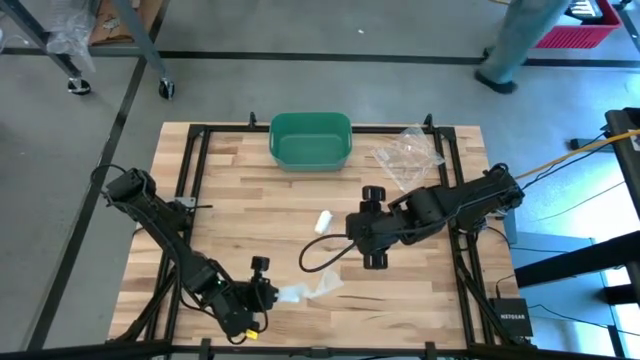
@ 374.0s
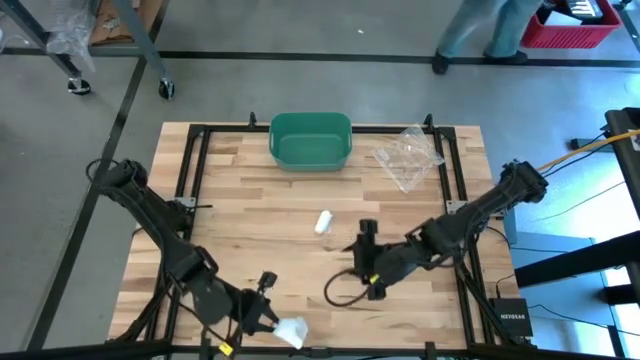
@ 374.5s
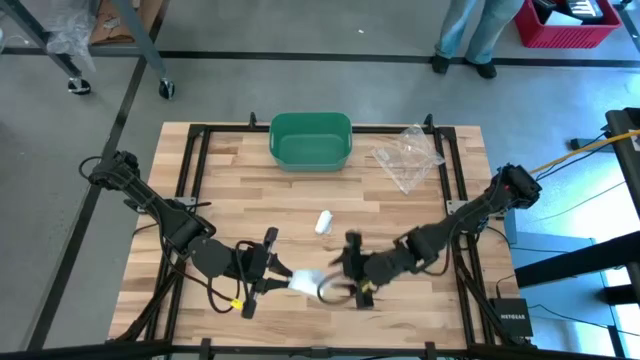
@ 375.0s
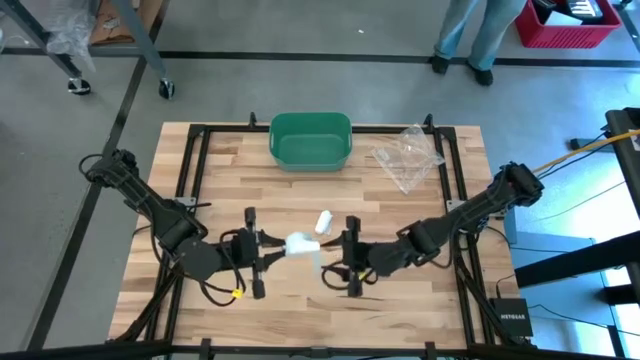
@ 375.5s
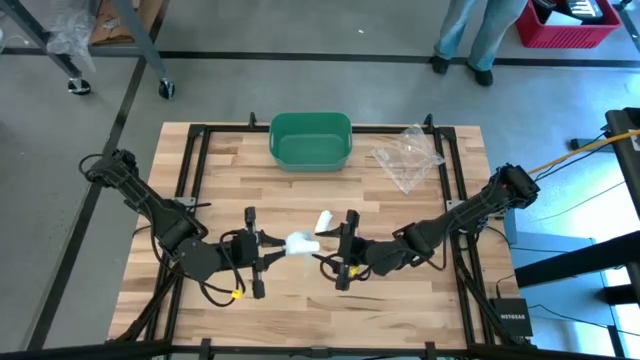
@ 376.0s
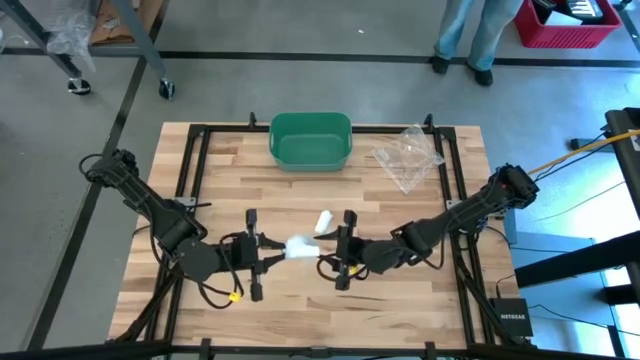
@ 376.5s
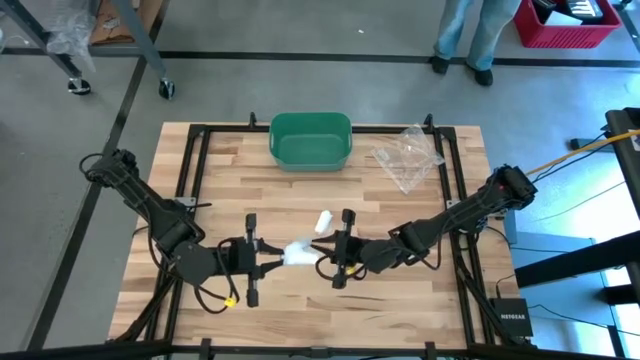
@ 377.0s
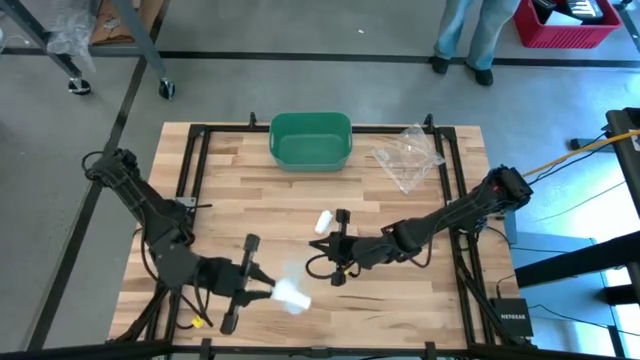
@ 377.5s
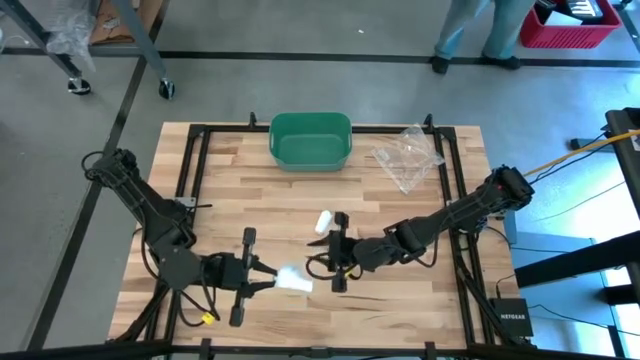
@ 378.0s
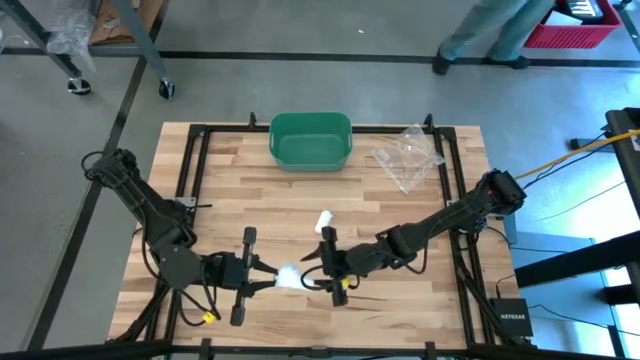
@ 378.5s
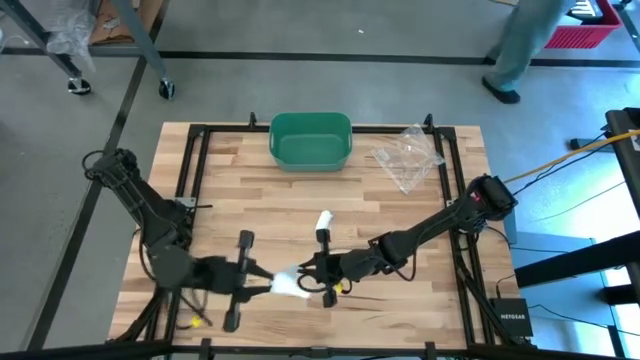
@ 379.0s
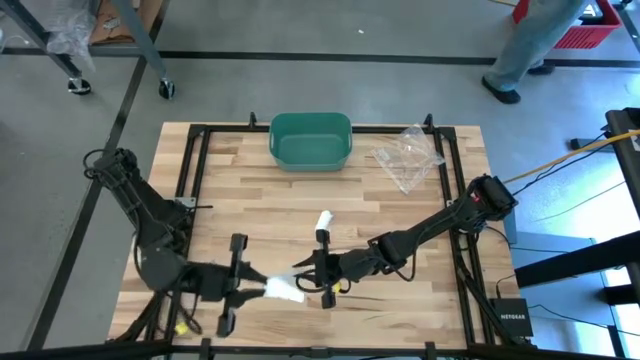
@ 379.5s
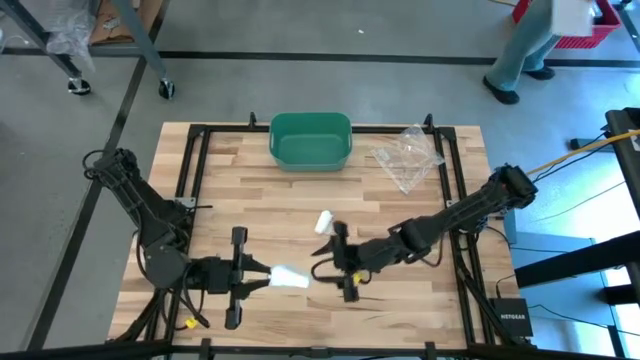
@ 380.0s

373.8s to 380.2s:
Task: Roll bandage
Roll the bottom white bandage

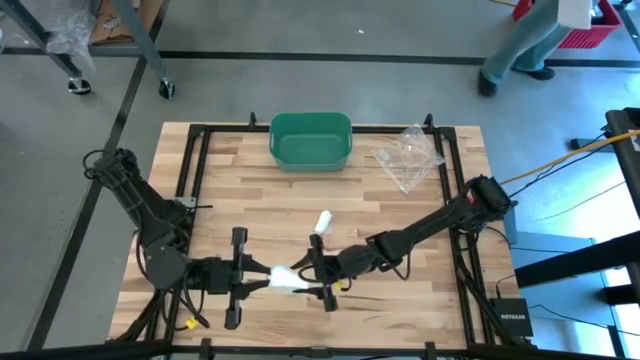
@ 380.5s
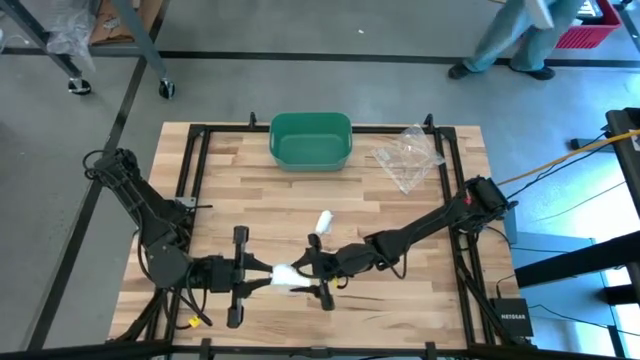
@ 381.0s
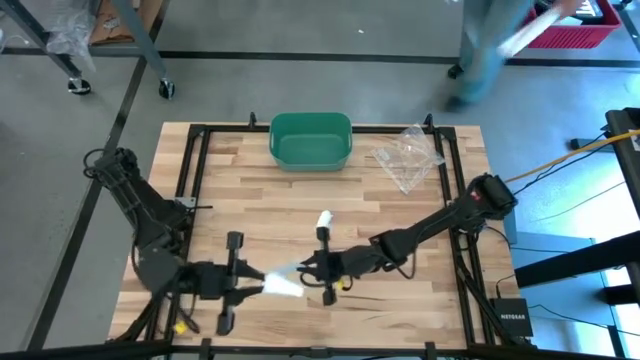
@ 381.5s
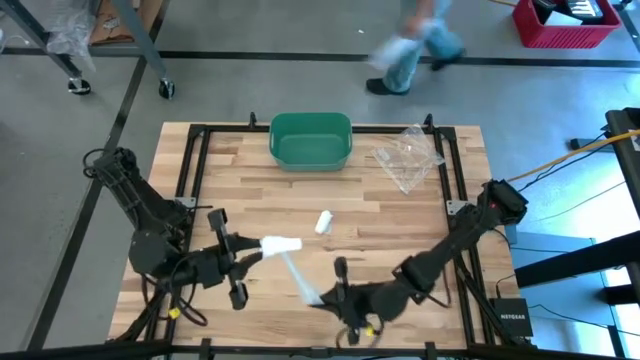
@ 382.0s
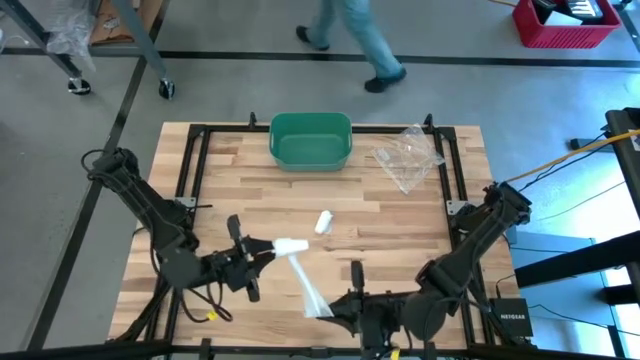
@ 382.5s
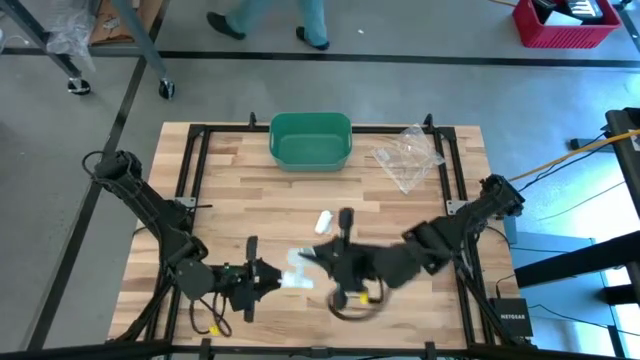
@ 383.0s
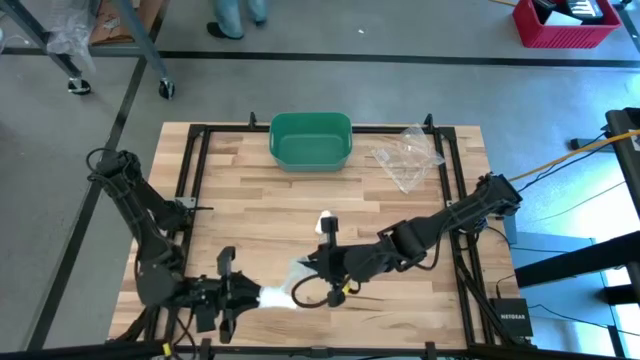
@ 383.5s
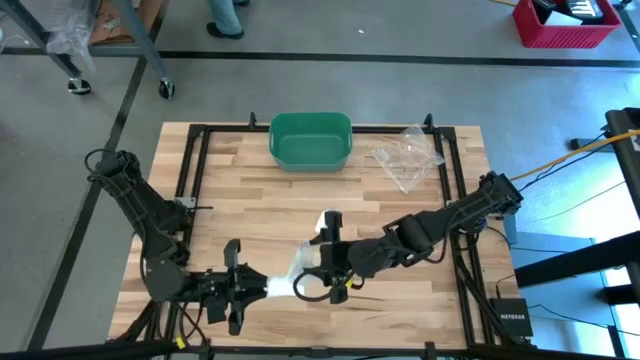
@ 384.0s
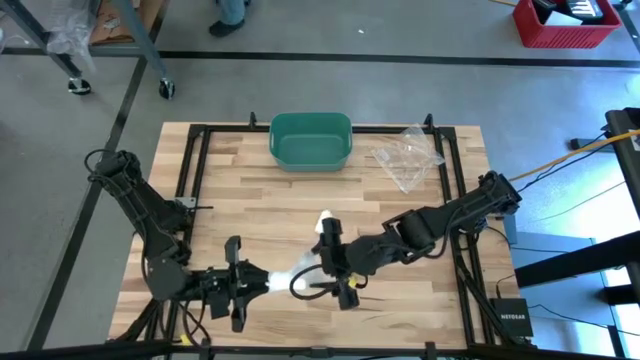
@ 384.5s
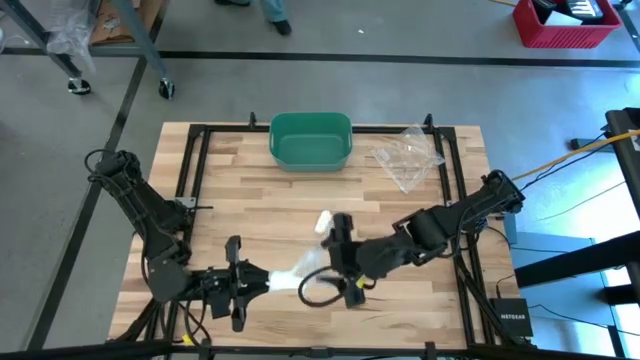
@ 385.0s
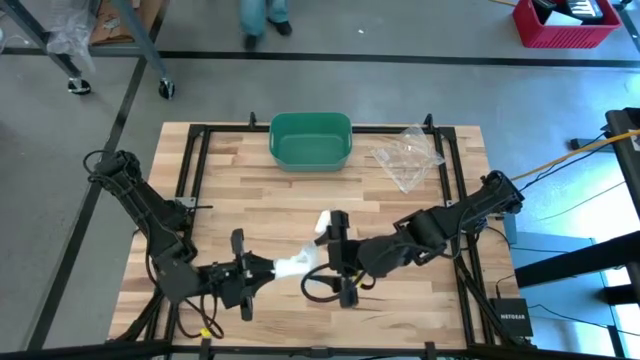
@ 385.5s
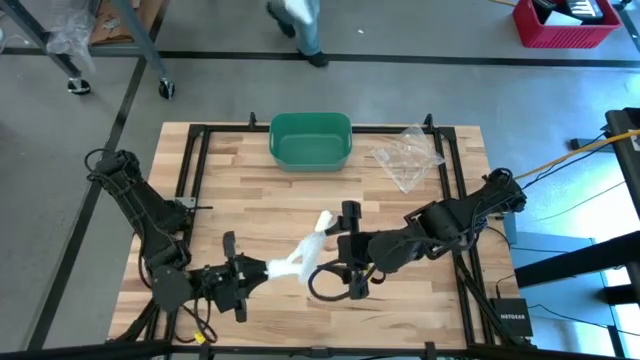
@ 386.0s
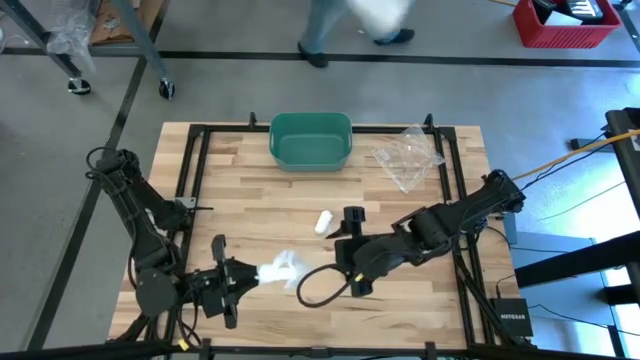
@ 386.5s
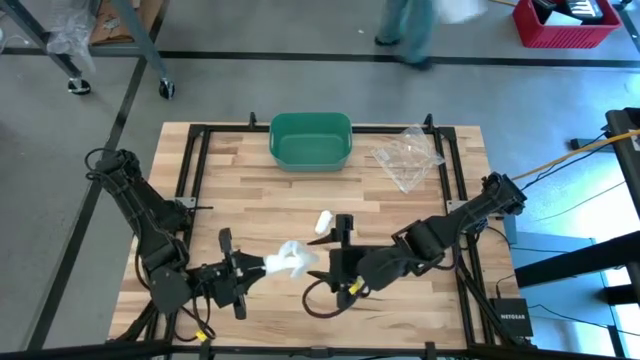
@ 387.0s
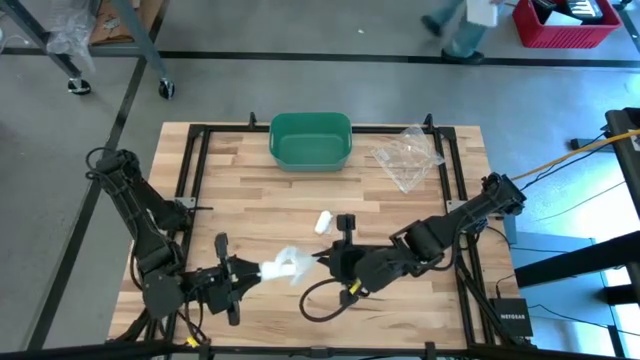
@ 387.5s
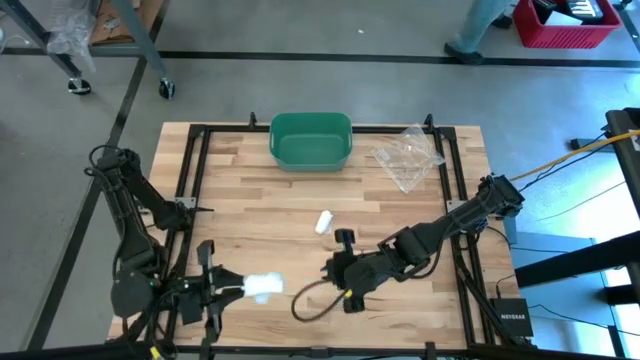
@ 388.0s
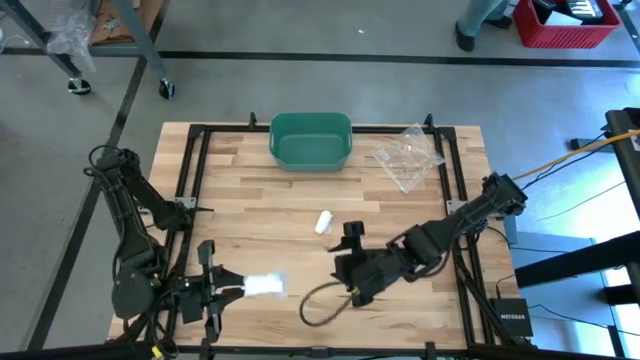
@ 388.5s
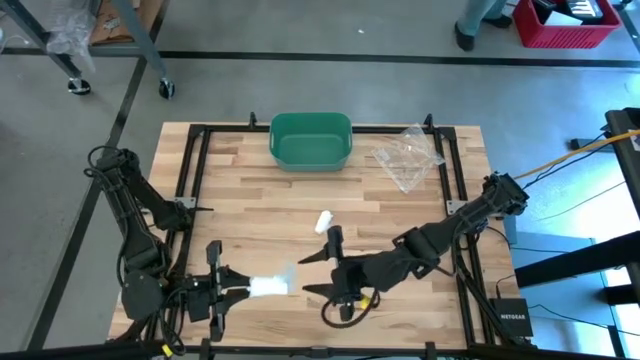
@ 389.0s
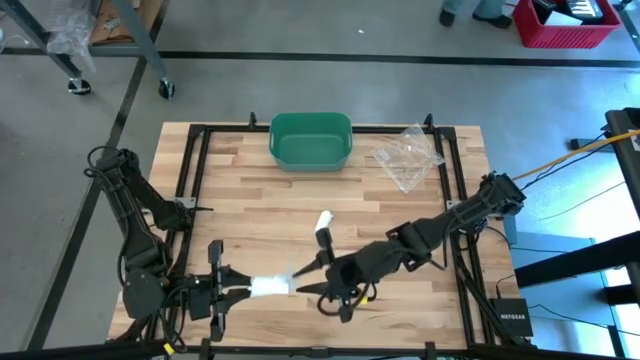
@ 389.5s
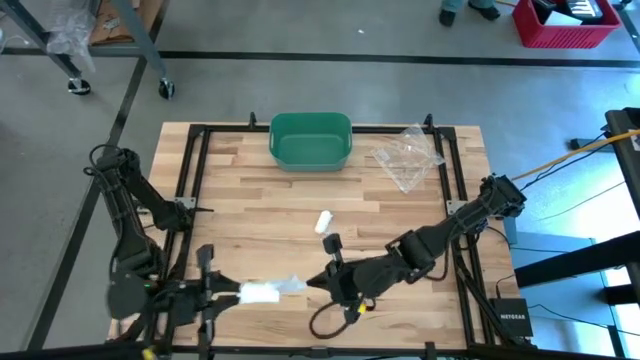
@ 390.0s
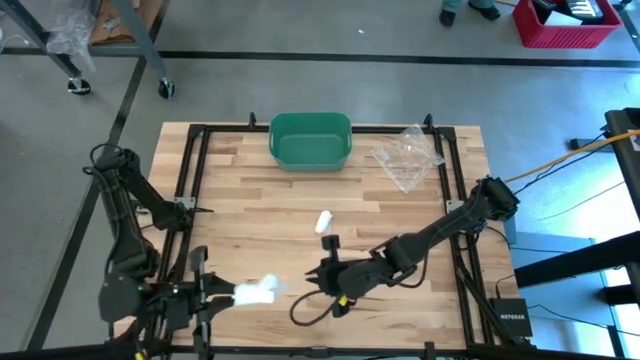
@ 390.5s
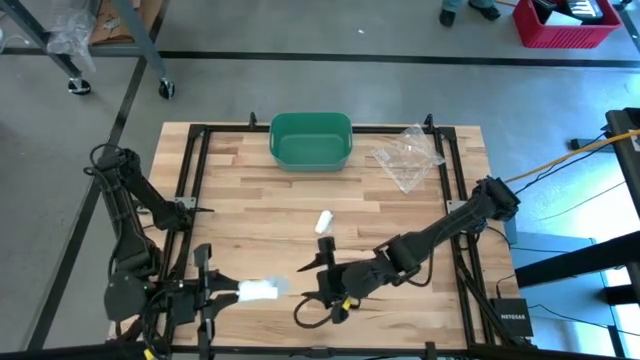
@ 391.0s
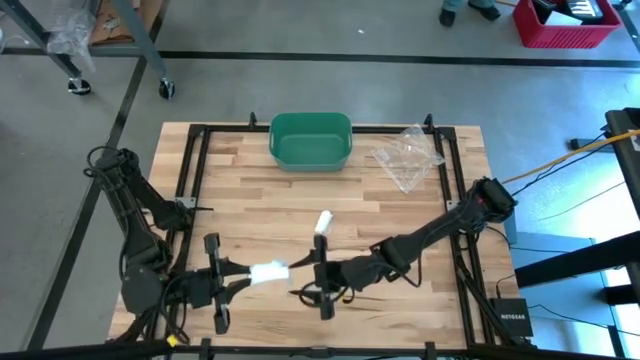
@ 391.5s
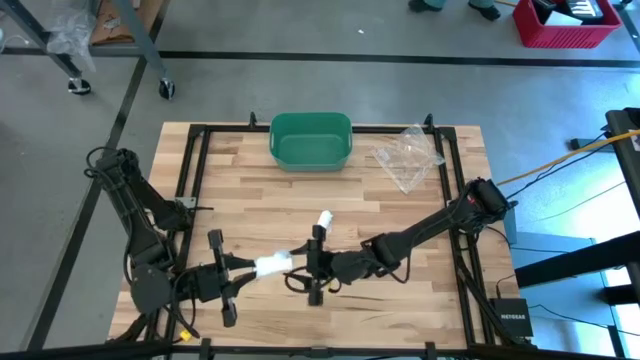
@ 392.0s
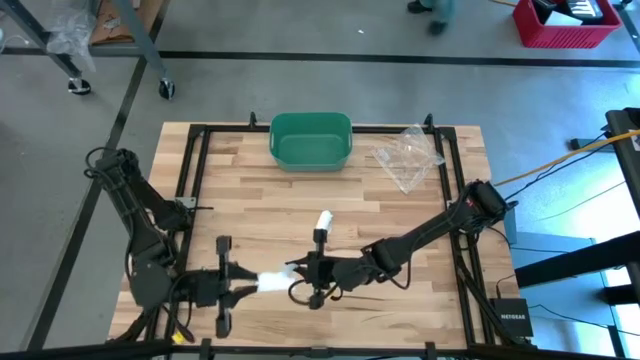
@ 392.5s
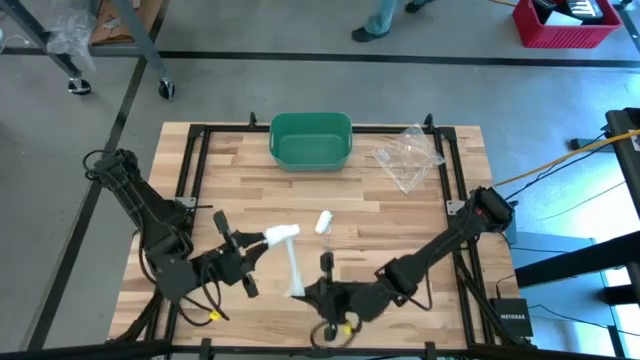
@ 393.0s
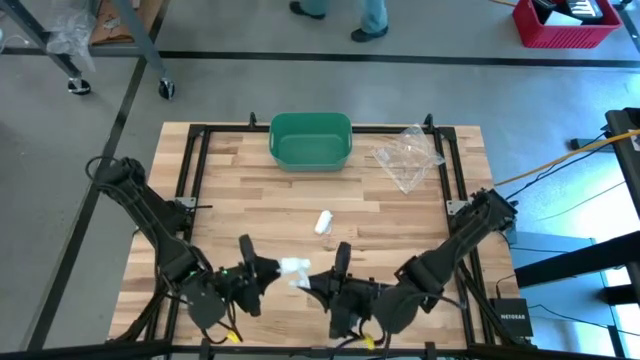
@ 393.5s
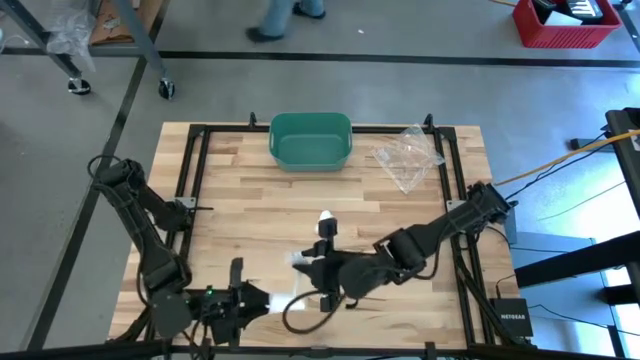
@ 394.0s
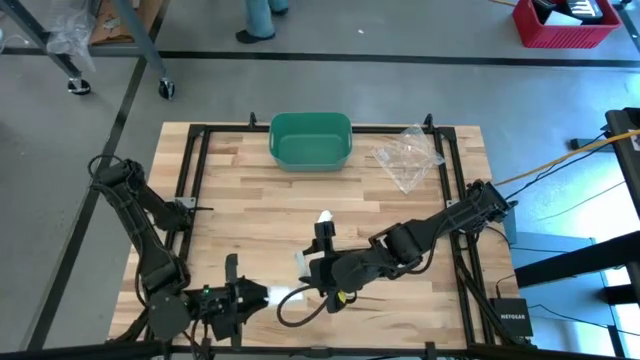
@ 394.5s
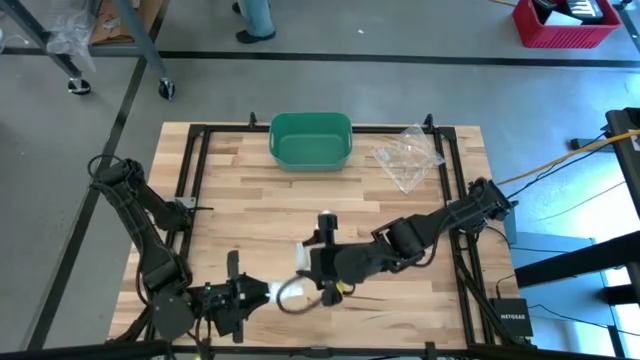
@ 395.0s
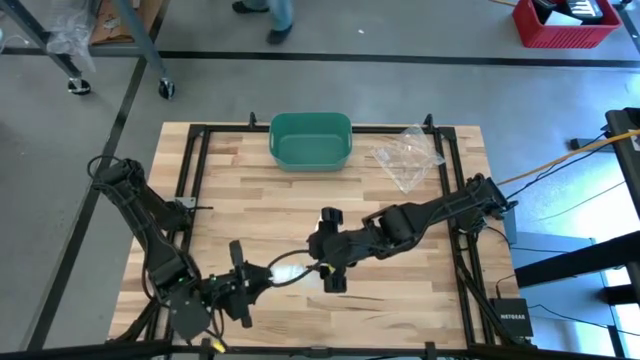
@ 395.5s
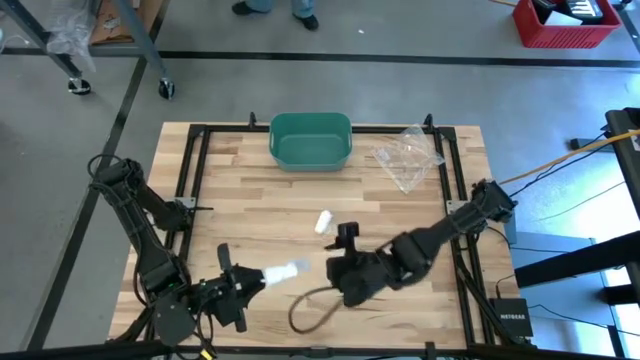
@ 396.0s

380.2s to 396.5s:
Roll the bottom white bandage
